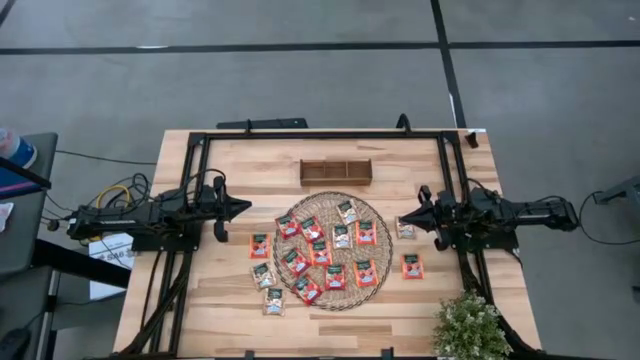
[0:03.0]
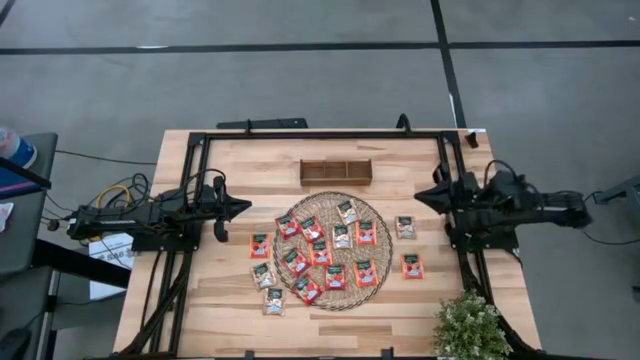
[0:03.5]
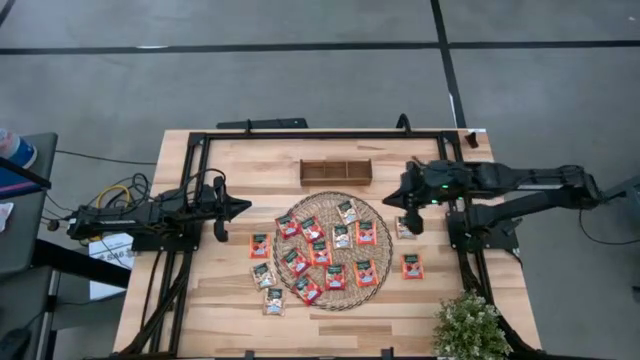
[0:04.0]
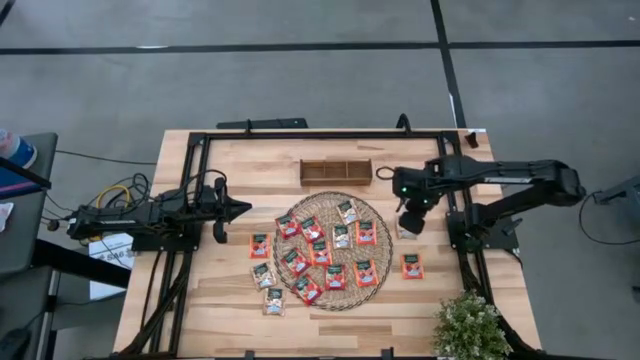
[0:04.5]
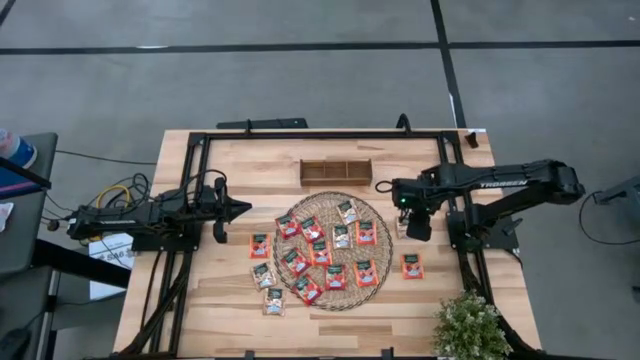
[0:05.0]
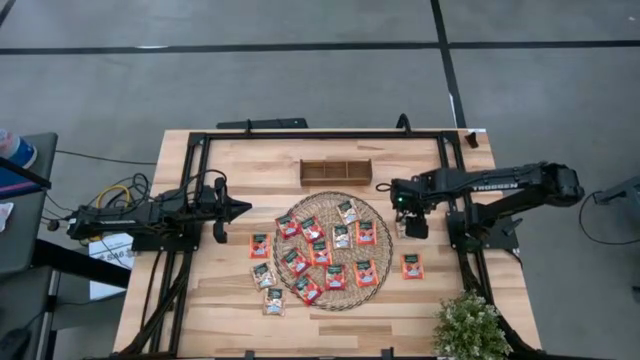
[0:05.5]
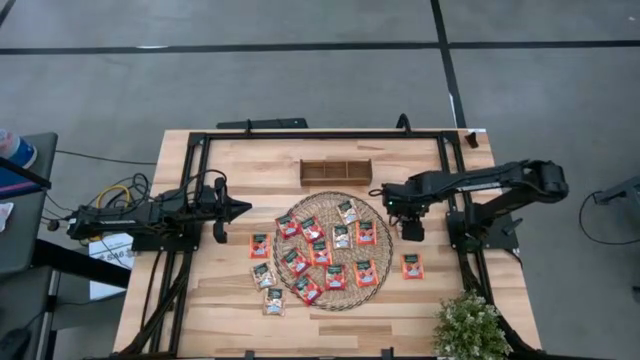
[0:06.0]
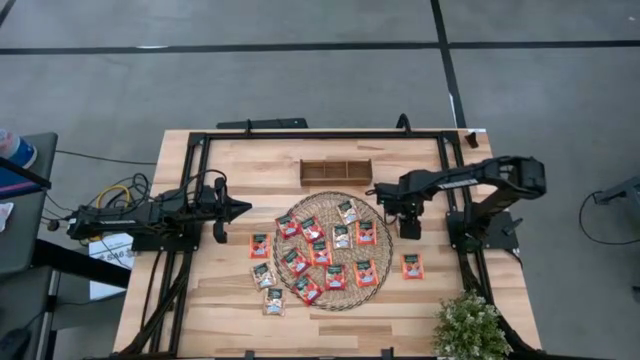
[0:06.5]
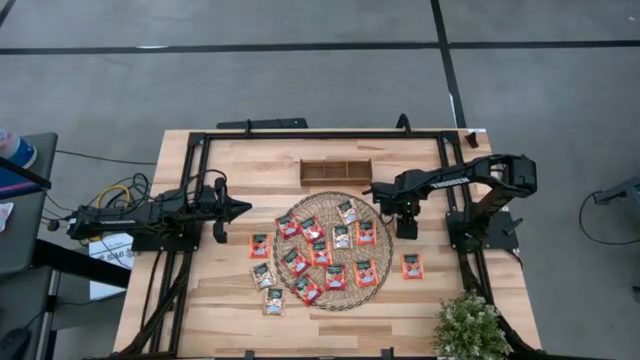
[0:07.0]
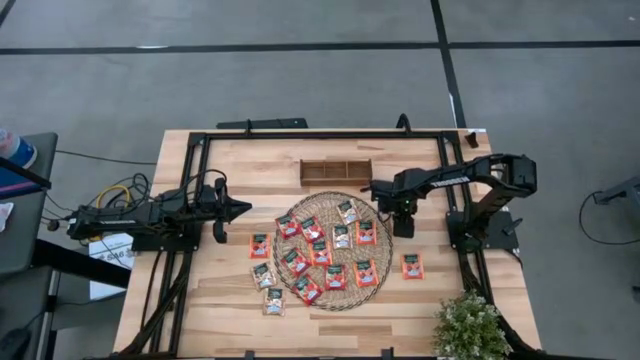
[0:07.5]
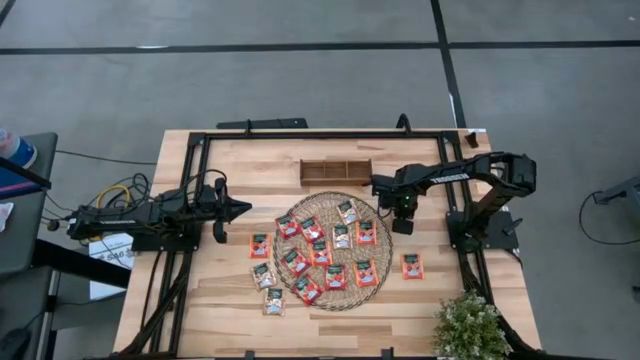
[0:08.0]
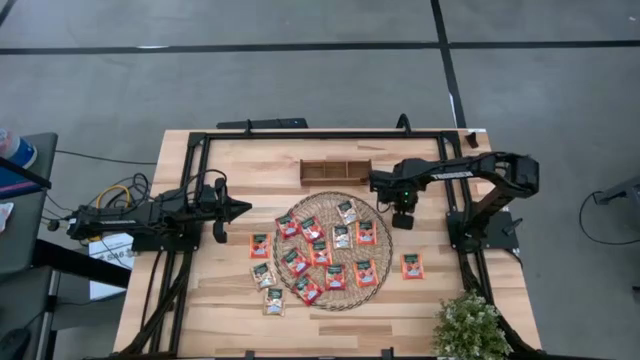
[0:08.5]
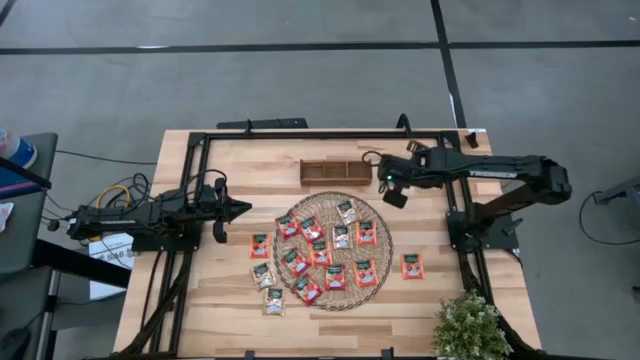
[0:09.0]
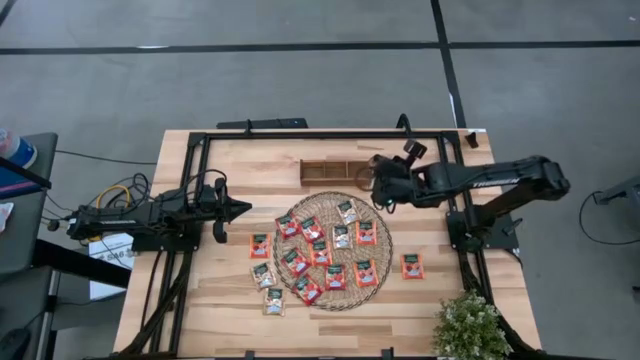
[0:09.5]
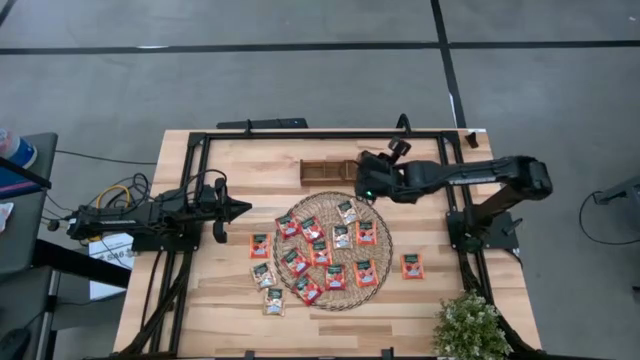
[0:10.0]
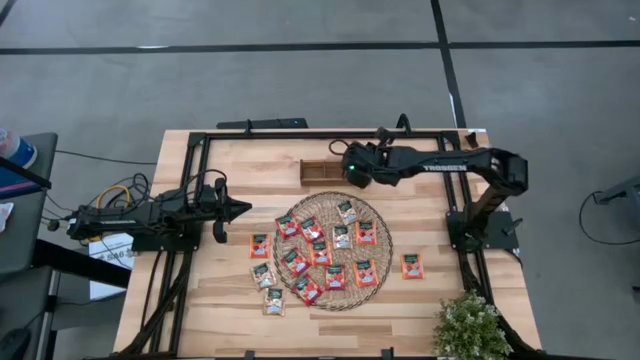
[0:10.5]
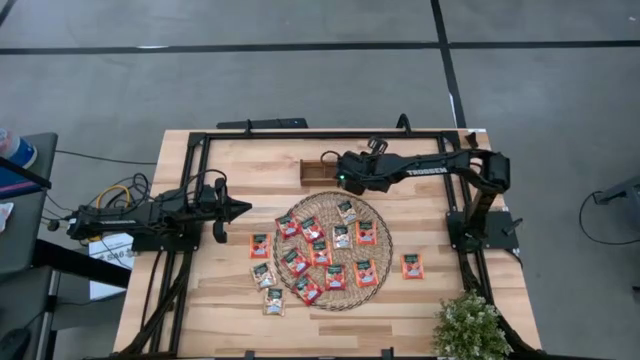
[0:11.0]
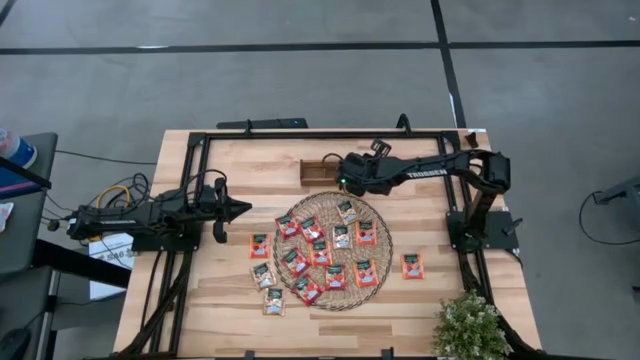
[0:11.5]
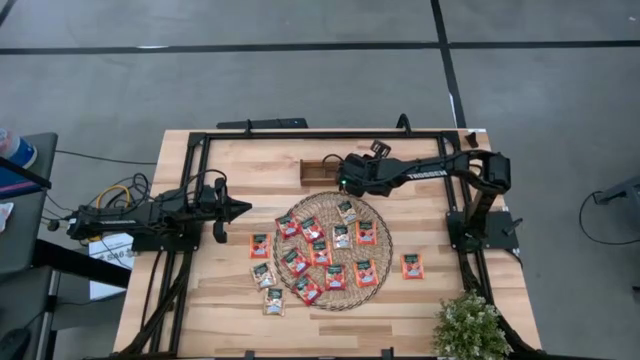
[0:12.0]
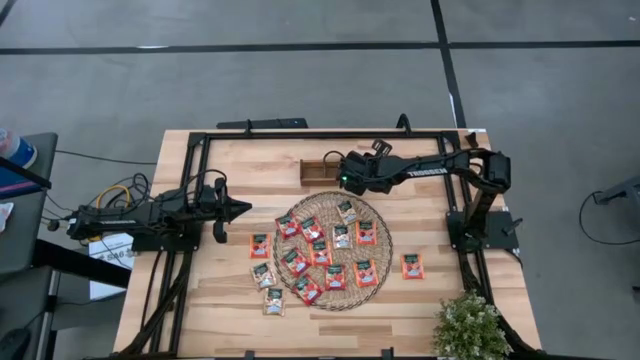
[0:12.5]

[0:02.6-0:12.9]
Task: Pick & Place Tea
Put the brown tea bag into the right slot of the wooden organizer

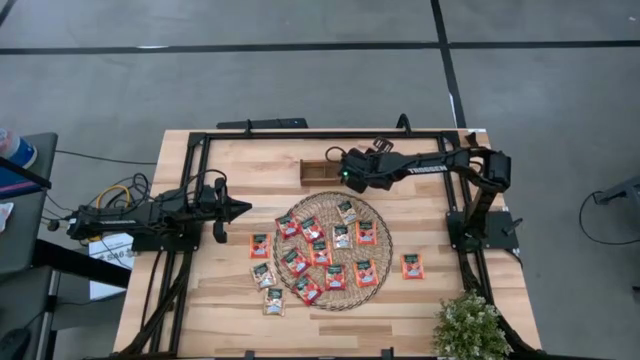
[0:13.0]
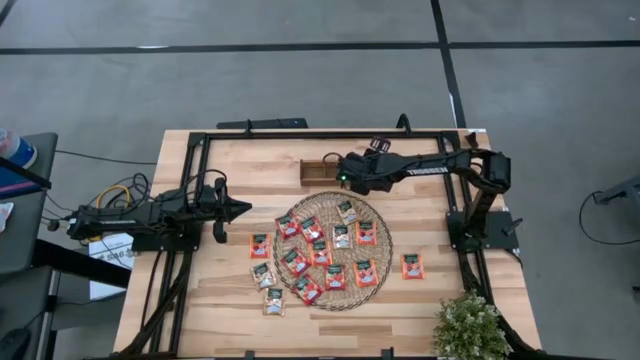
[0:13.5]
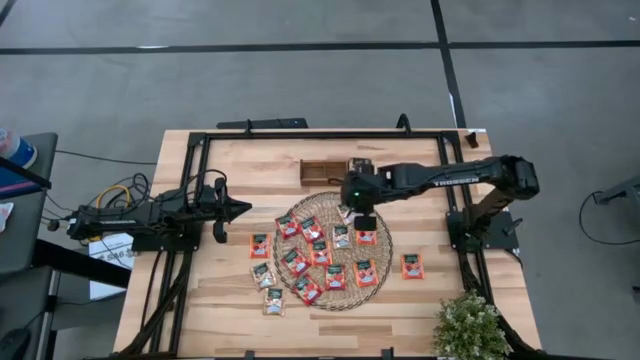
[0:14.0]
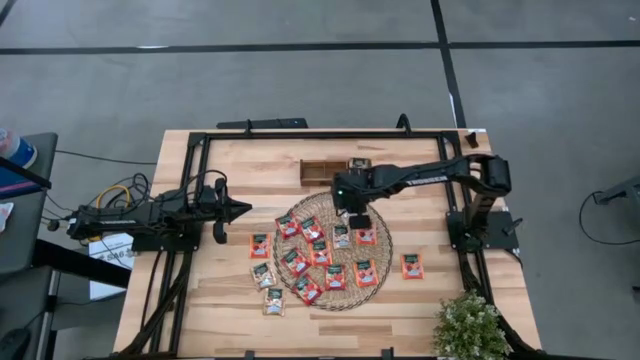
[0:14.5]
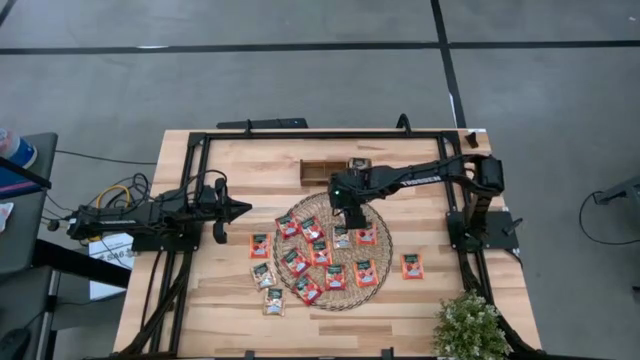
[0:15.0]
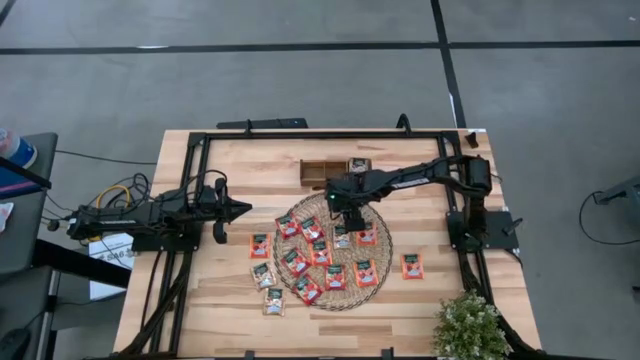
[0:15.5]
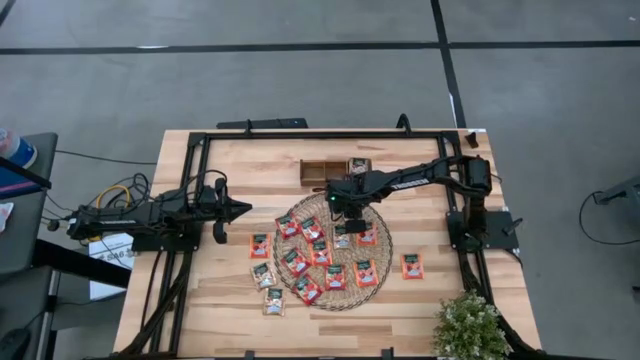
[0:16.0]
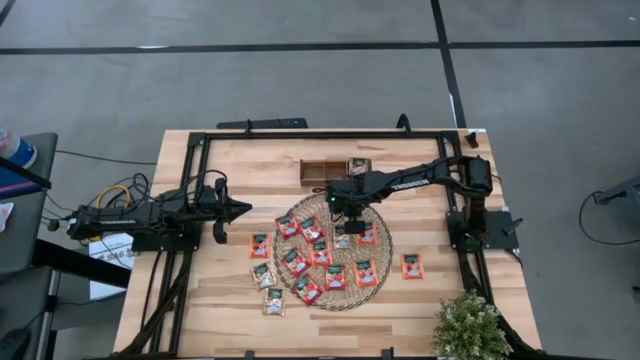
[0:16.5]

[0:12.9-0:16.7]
Put the brown tea bag into the right slot of the wooden organizer

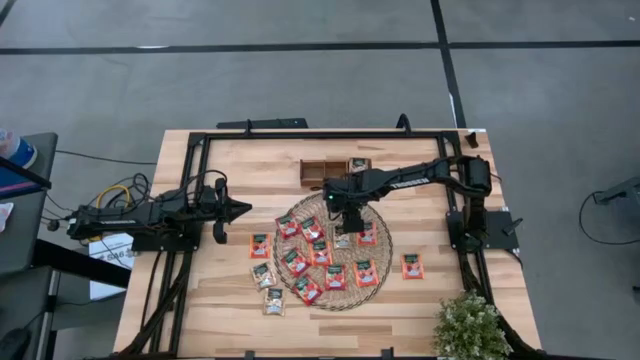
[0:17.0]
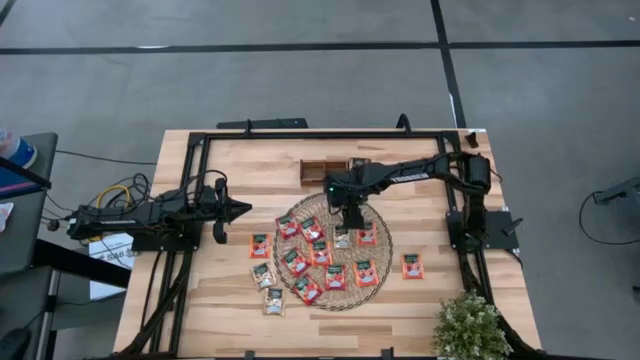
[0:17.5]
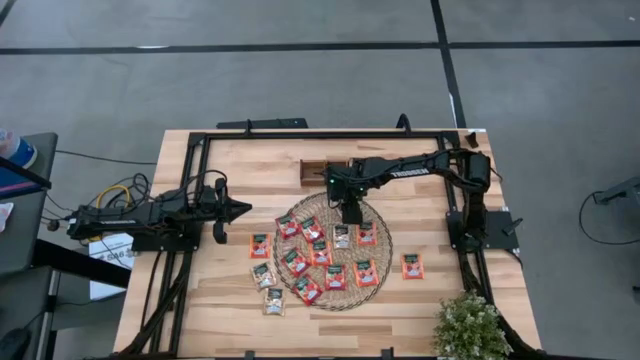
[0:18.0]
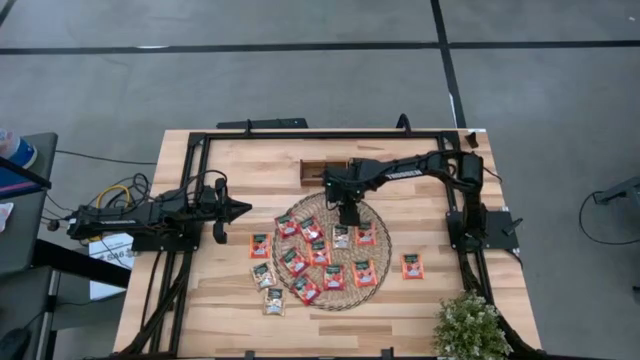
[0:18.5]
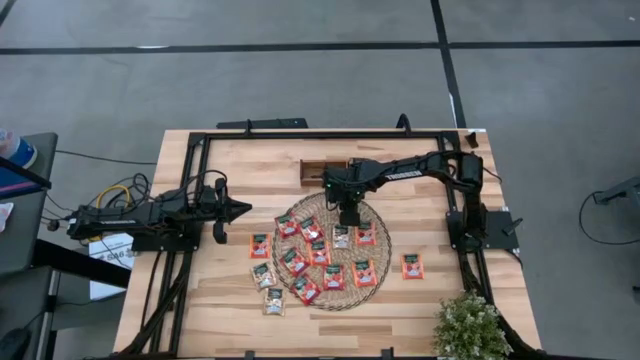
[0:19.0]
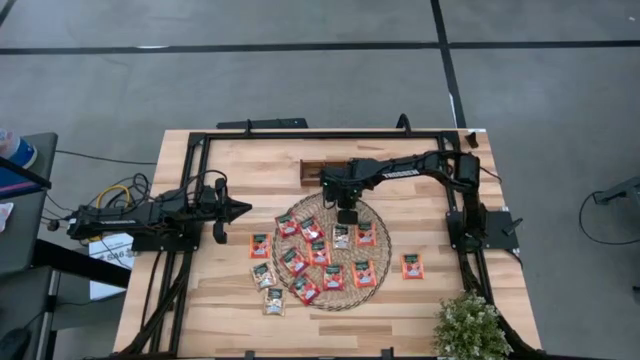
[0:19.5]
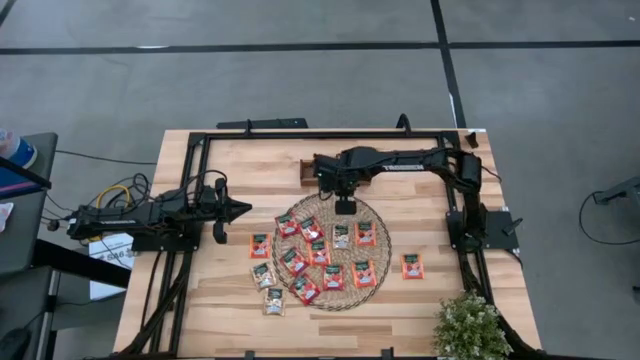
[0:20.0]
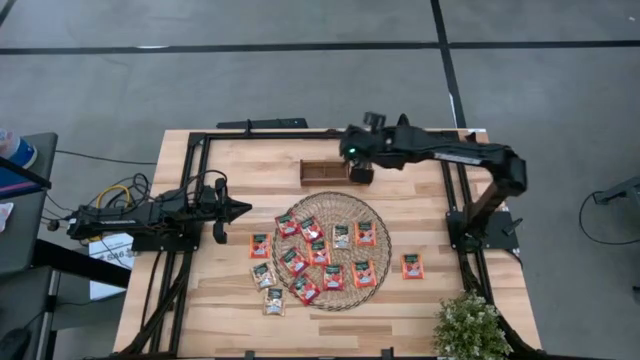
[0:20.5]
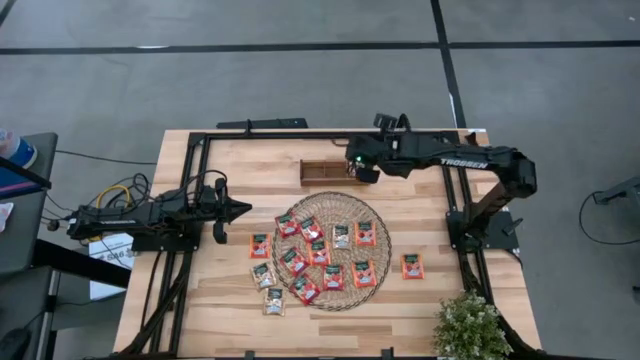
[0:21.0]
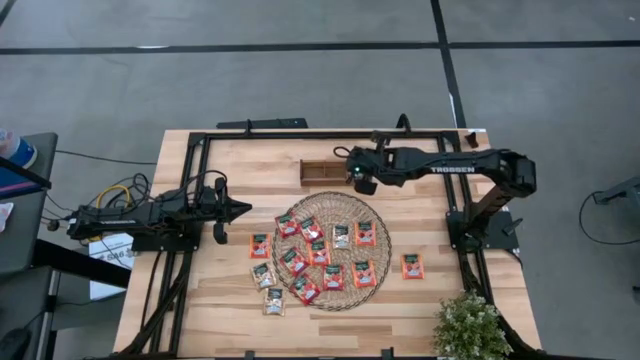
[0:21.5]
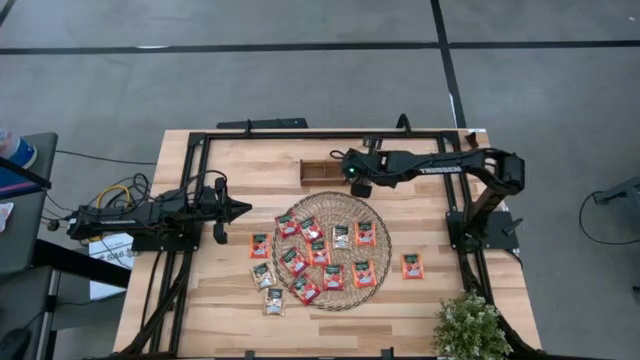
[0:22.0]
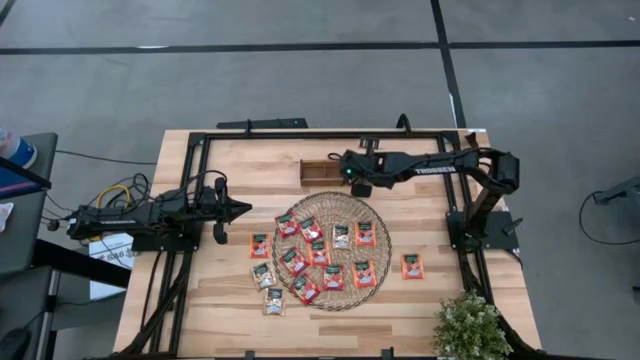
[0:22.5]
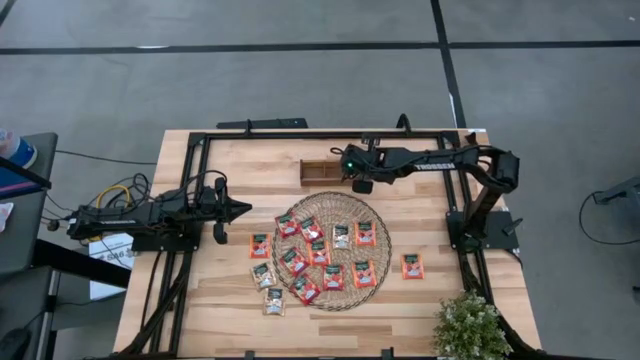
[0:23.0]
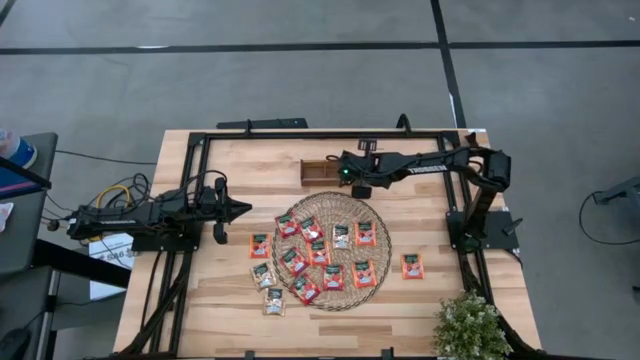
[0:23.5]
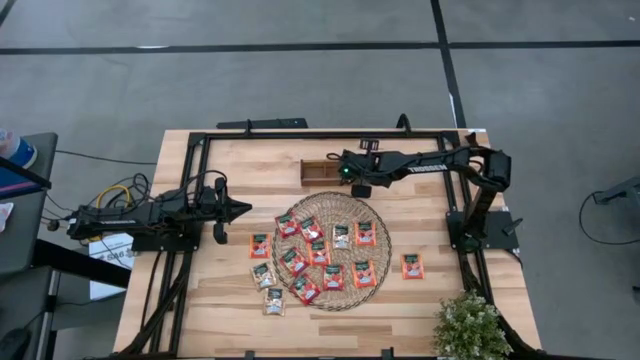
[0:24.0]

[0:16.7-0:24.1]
Put the brown tea bag into the right slot of the wooden organizer
